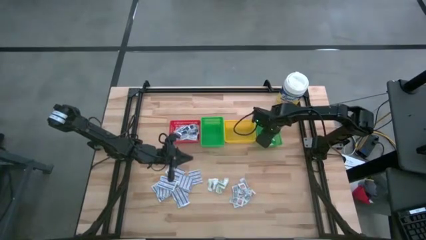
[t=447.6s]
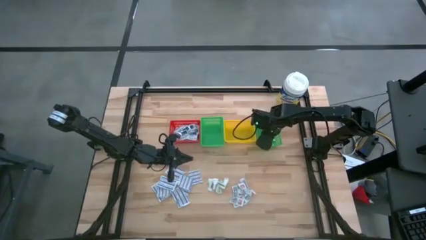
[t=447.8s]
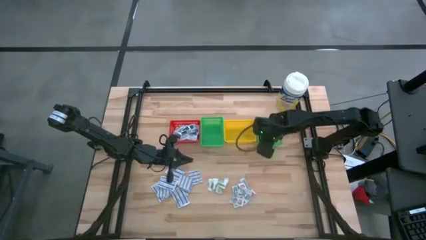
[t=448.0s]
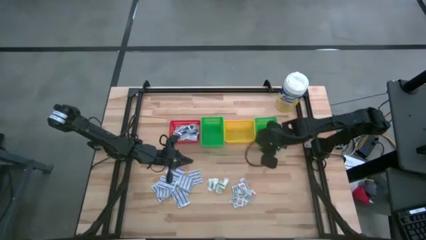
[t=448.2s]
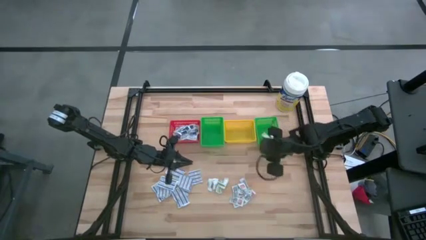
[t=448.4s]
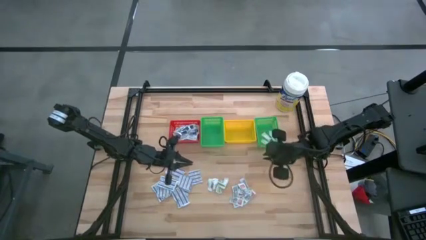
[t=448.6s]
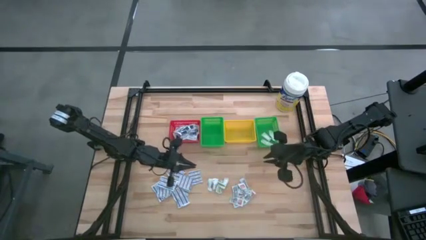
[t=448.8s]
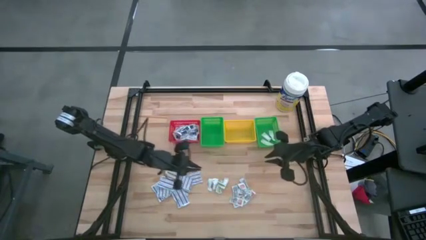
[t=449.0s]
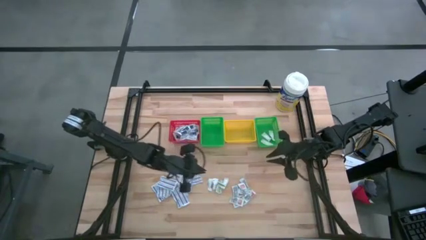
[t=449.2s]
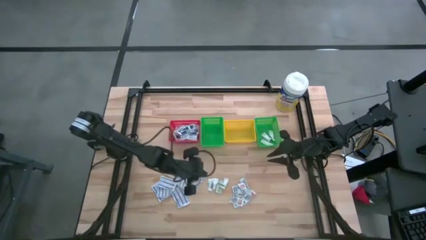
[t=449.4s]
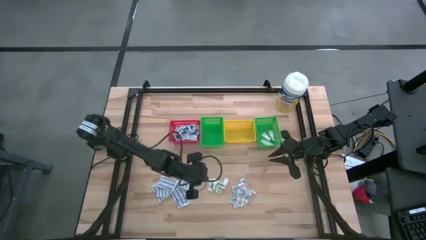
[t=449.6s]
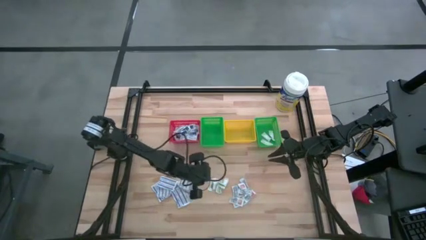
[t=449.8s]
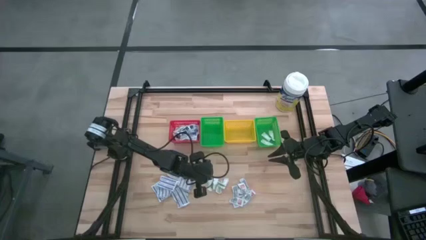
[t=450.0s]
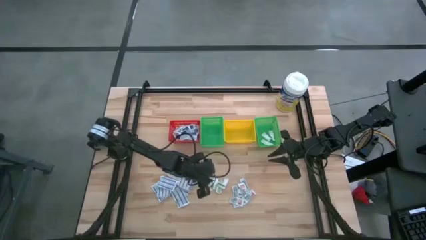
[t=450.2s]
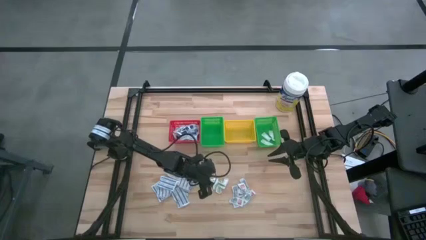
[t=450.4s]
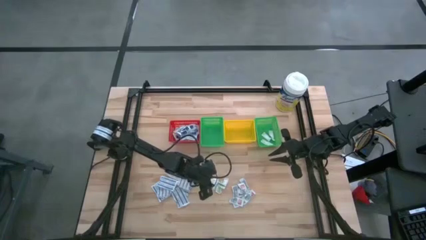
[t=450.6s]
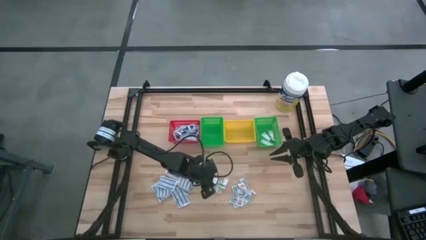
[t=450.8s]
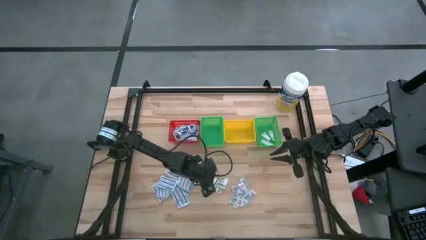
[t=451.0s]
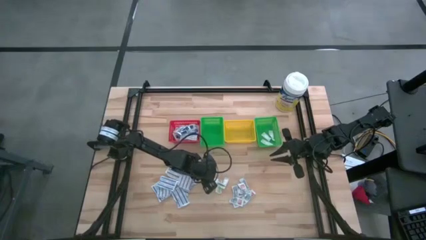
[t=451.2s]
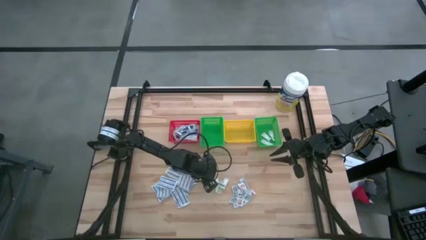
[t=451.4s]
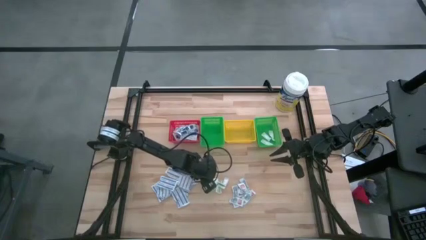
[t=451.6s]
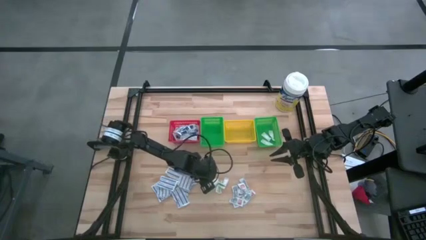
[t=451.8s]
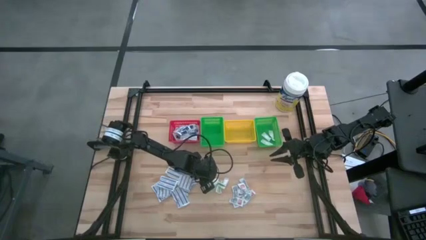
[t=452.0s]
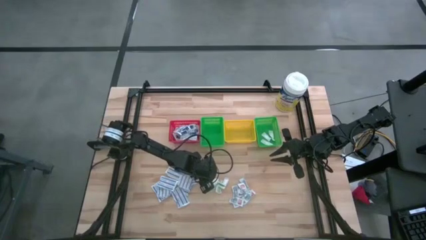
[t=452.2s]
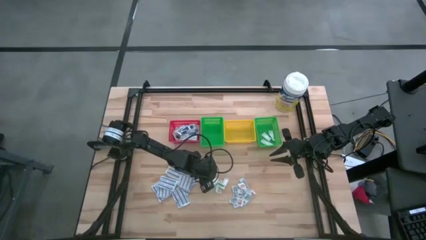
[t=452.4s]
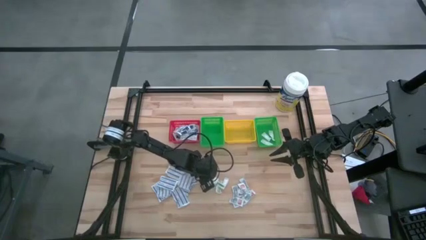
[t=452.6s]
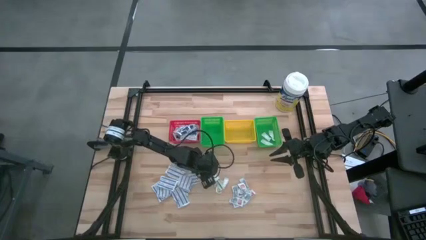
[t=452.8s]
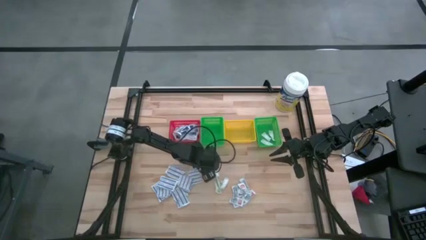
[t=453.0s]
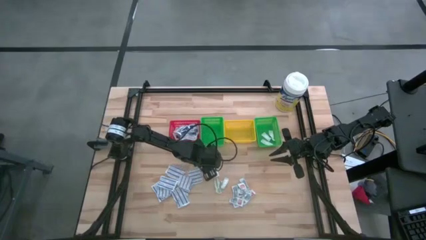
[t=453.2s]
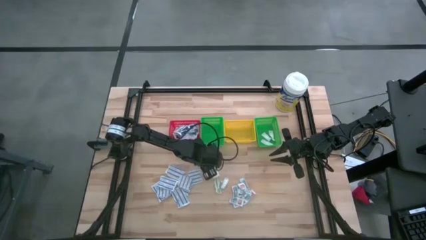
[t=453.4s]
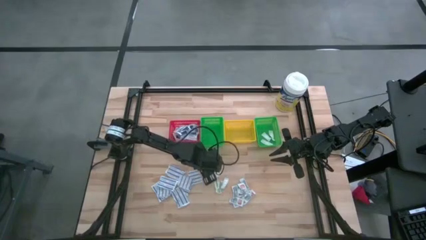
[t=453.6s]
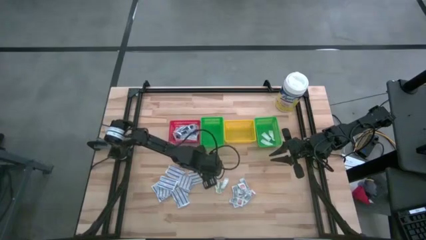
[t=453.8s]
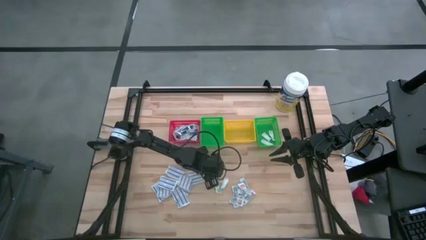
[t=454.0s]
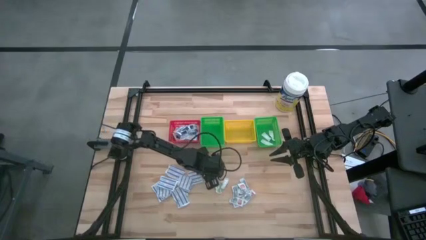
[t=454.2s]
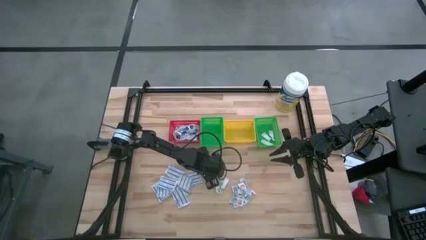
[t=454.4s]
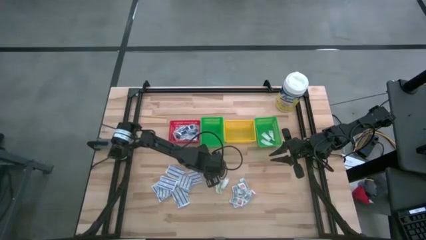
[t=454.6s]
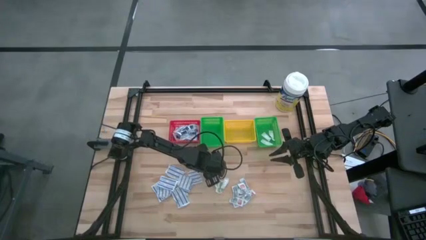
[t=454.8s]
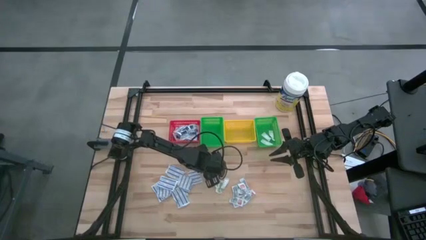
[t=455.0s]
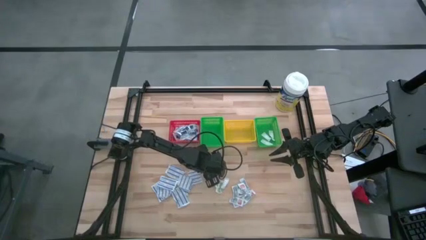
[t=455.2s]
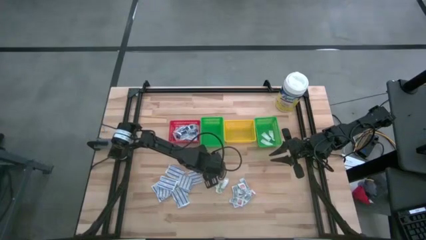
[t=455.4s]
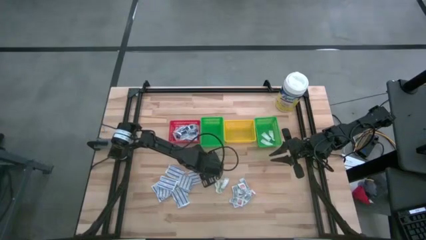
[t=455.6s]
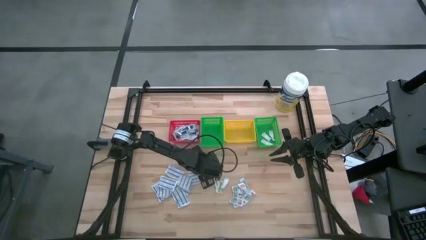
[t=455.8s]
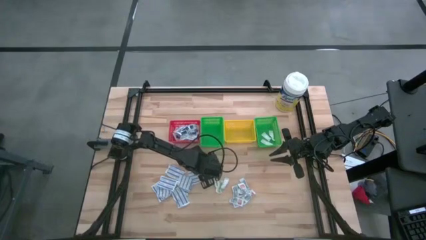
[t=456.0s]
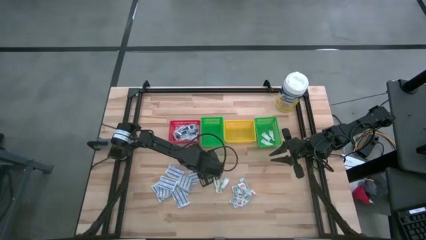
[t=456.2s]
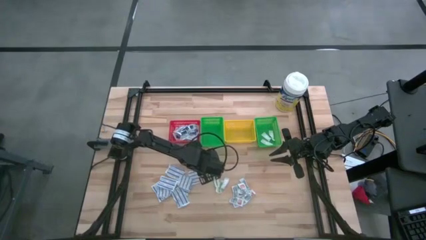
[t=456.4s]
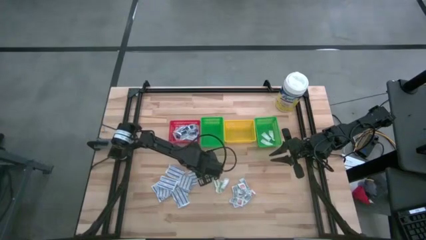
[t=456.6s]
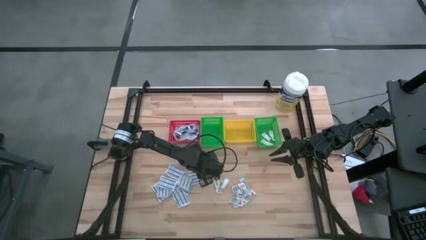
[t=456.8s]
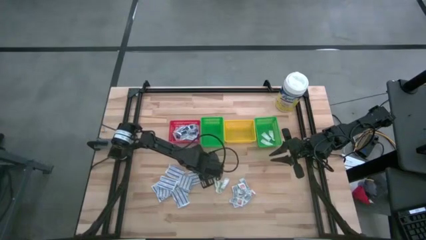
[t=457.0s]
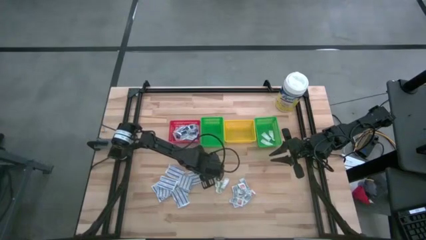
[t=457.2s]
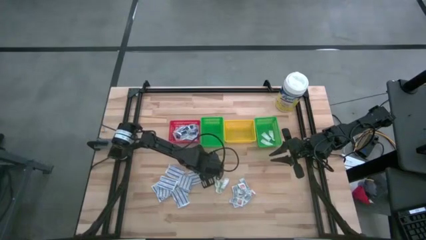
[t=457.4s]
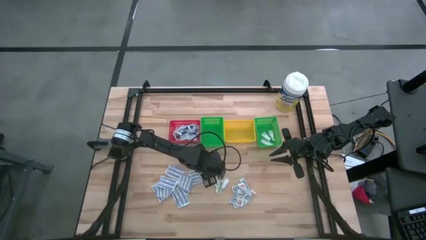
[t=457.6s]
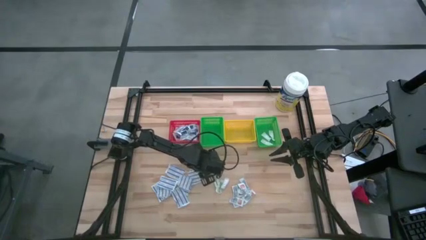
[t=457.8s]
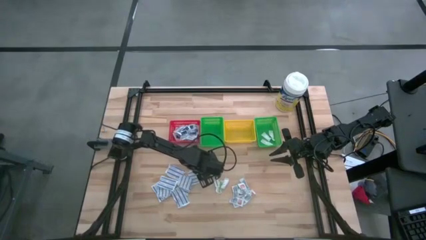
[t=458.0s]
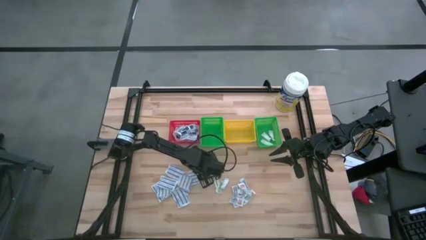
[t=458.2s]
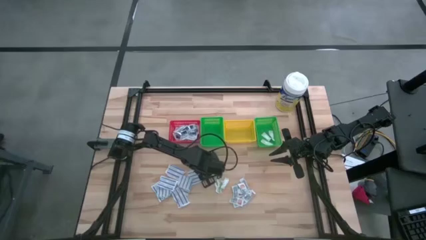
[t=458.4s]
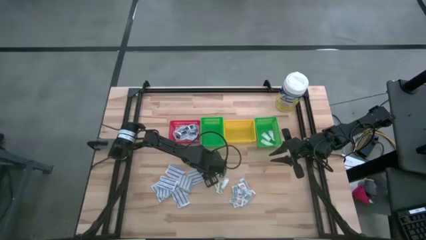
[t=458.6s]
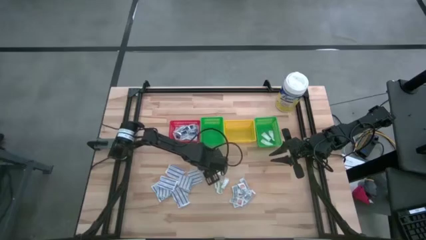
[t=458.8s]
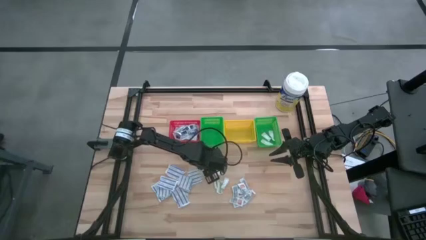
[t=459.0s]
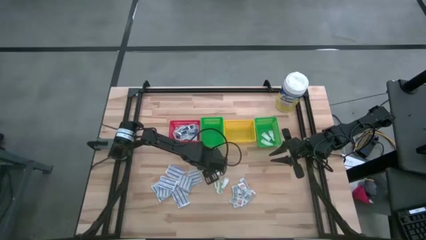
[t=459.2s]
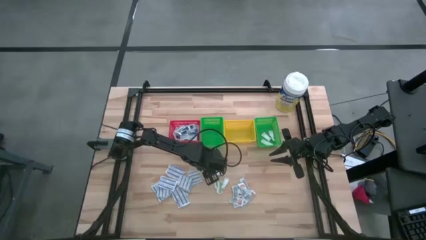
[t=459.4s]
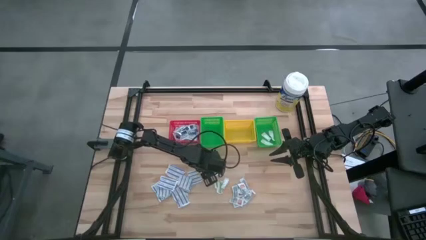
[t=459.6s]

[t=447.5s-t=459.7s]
Task: Pick & Place First Aid Supplies
Put the green bandage into the right green basket

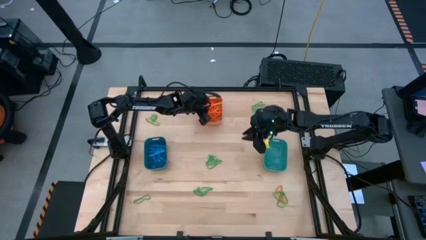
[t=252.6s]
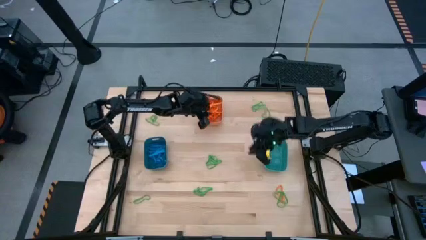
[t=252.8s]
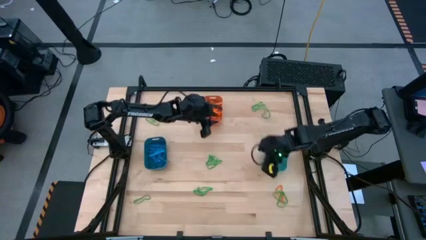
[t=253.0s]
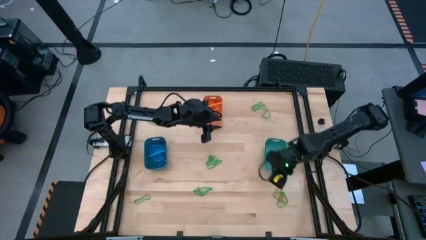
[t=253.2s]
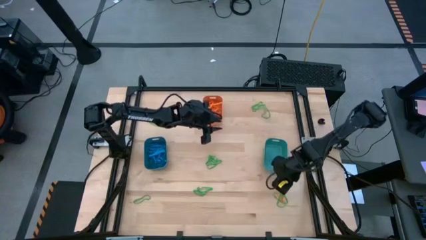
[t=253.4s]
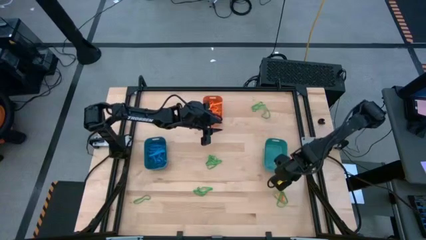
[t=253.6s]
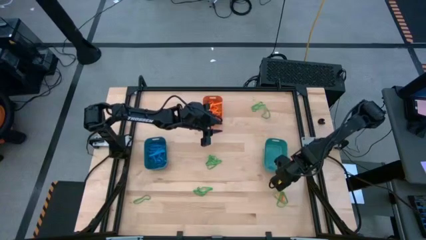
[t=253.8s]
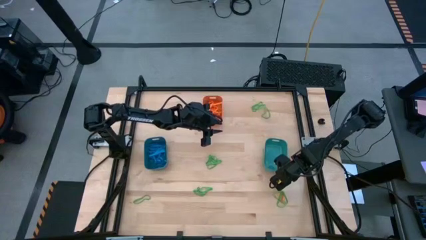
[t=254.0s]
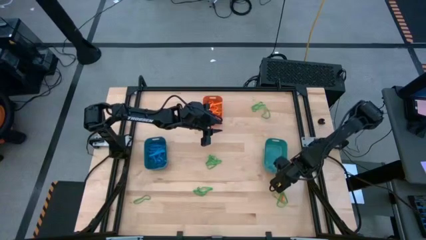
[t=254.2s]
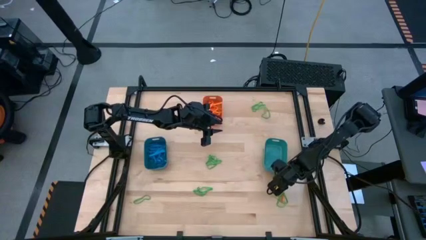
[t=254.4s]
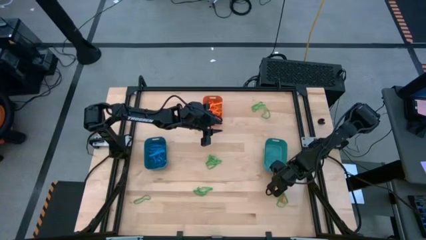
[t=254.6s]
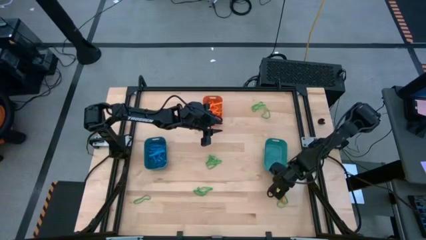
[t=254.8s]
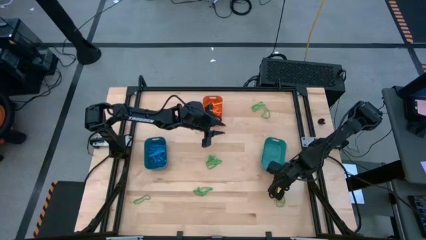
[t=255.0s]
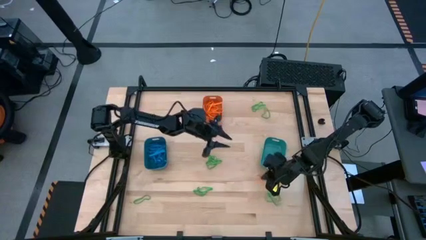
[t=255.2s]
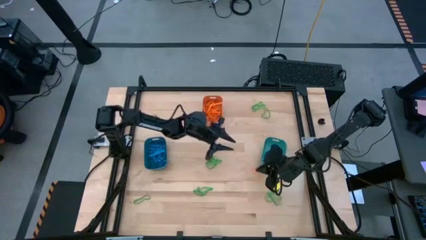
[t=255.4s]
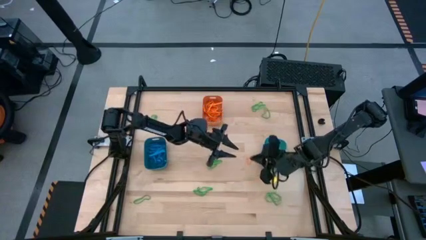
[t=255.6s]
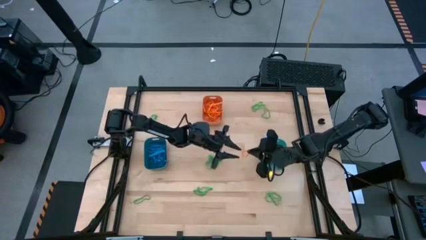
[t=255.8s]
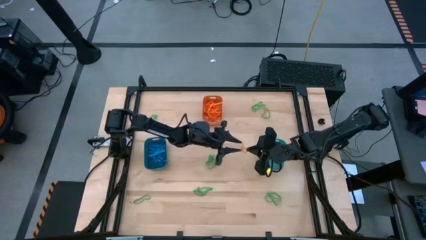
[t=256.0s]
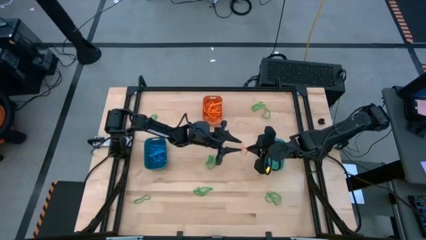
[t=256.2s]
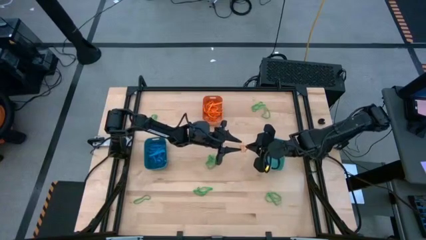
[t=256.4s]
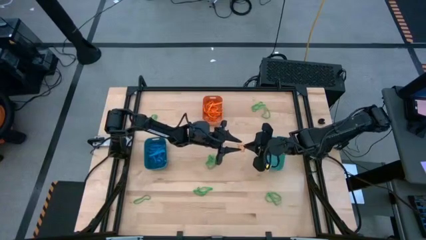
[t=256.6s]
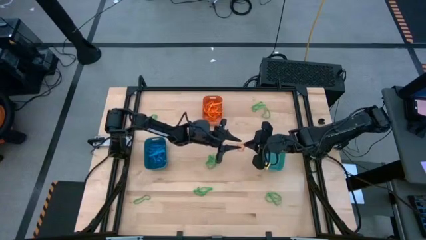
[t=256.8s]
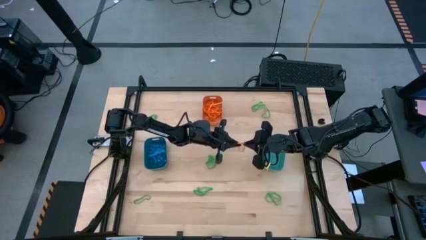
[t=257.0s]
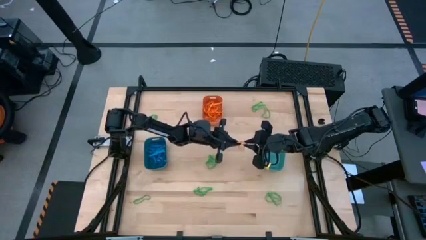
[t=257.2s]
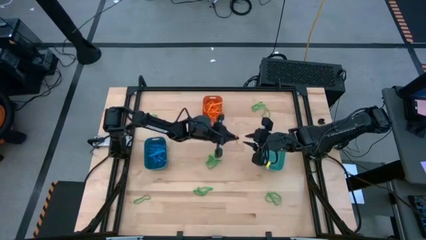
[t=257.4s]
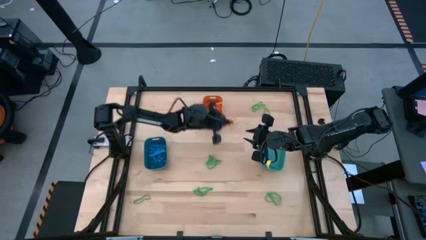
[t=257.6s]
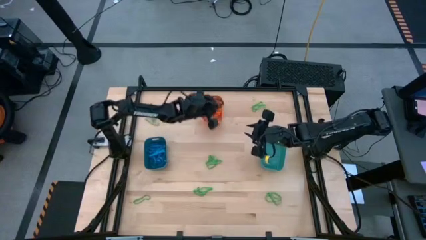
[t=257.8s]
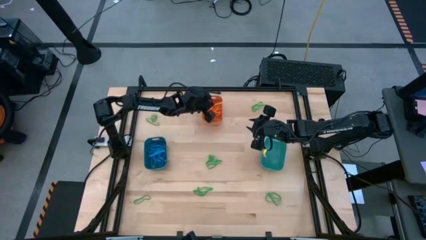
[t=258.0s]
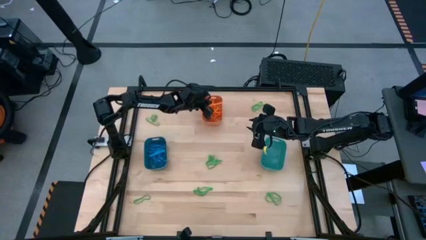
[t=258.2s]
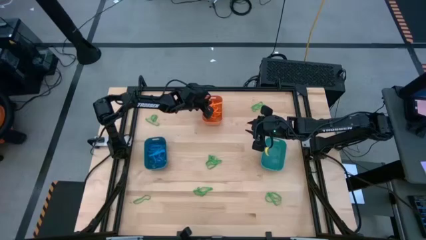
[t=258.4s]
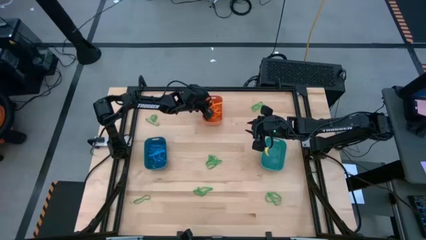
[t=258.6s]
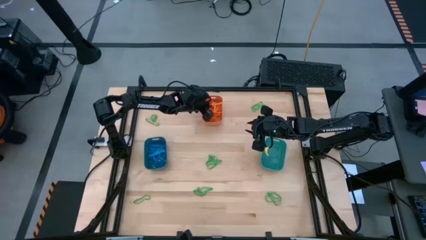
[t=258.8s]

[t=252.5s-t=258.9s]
Task: Sort rubber bands into baskets
Put the orange rubber band into the orange bin
